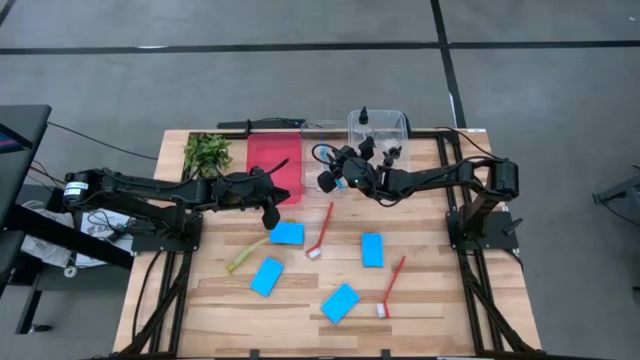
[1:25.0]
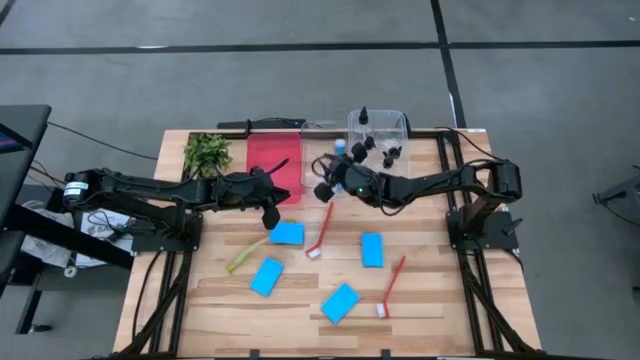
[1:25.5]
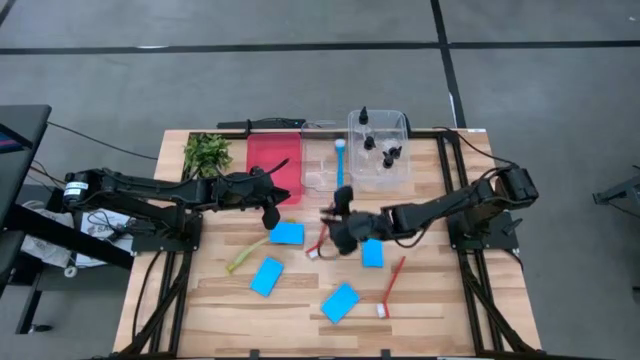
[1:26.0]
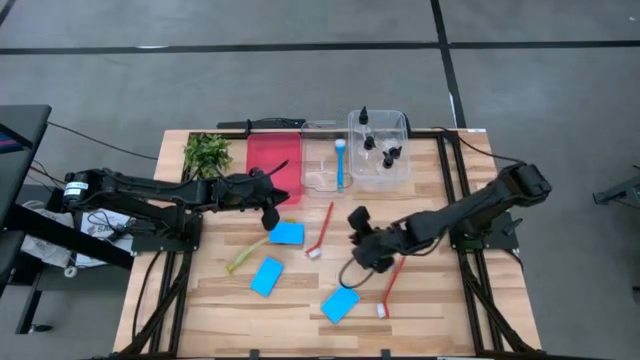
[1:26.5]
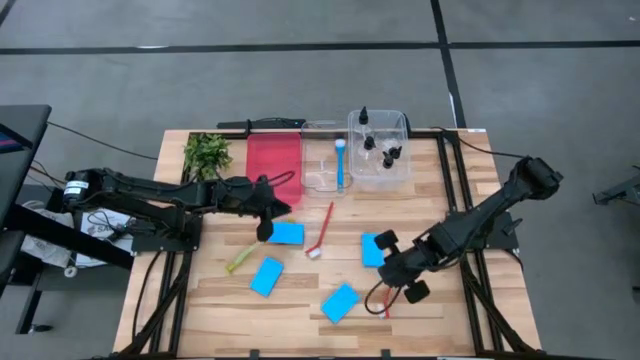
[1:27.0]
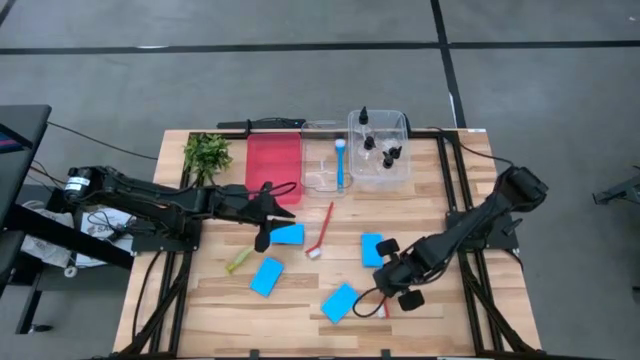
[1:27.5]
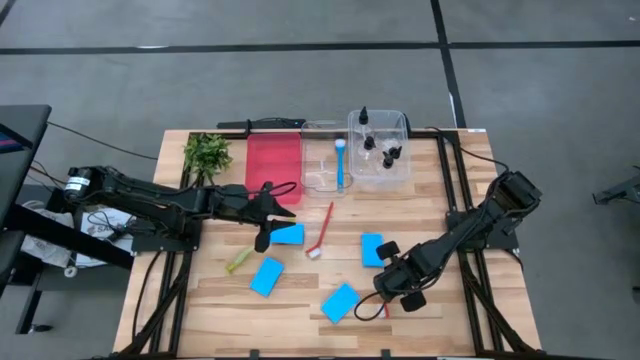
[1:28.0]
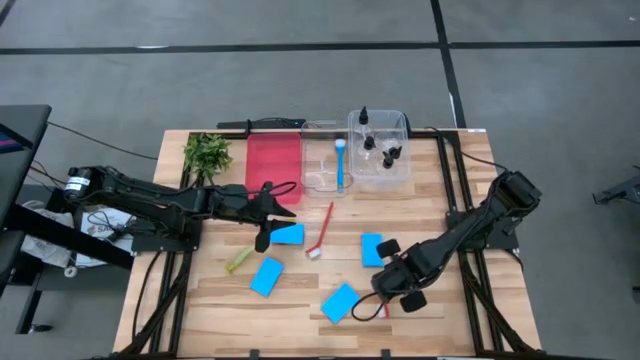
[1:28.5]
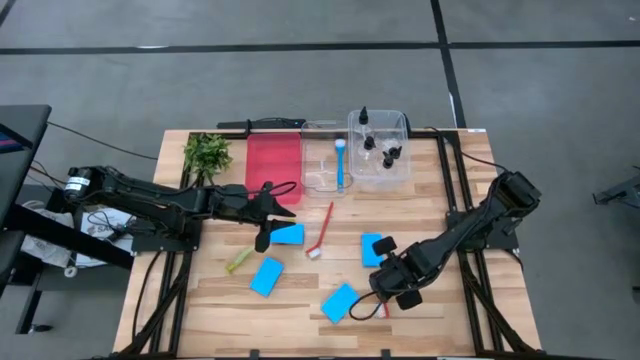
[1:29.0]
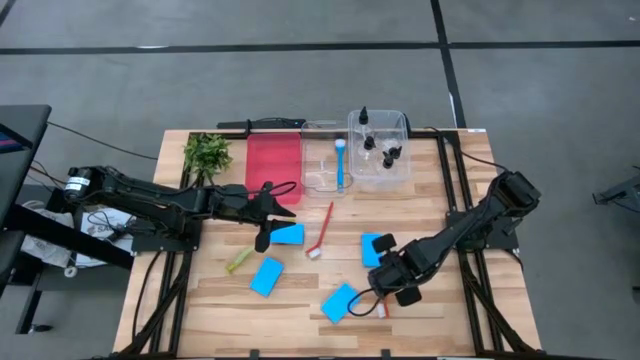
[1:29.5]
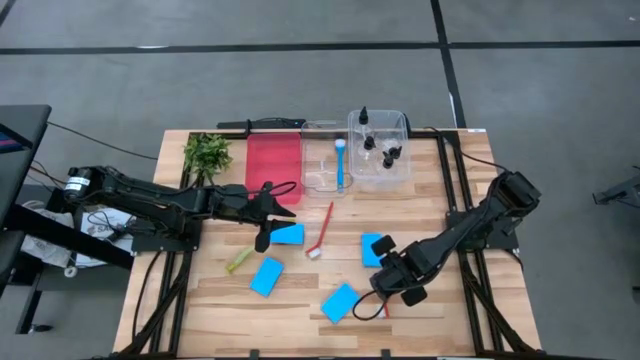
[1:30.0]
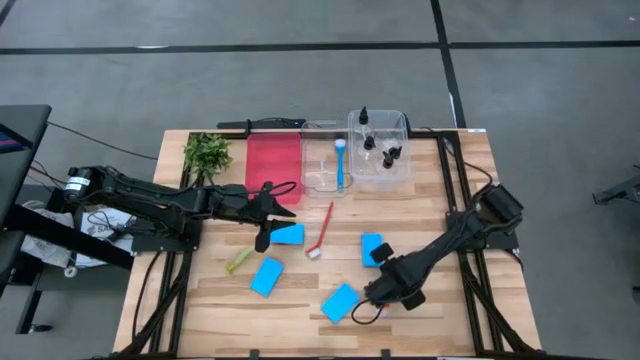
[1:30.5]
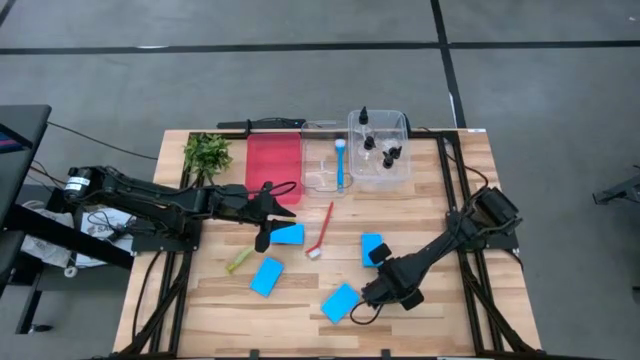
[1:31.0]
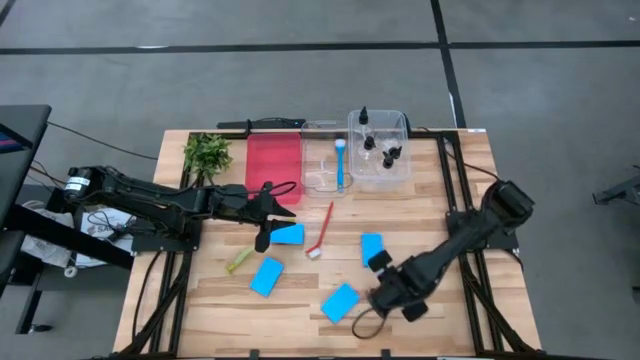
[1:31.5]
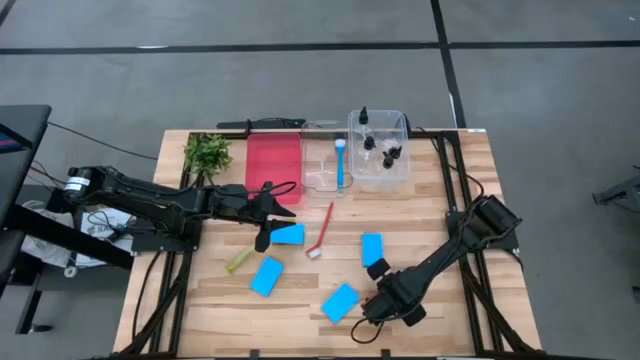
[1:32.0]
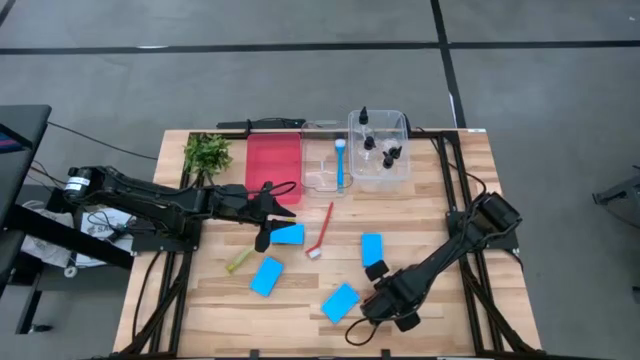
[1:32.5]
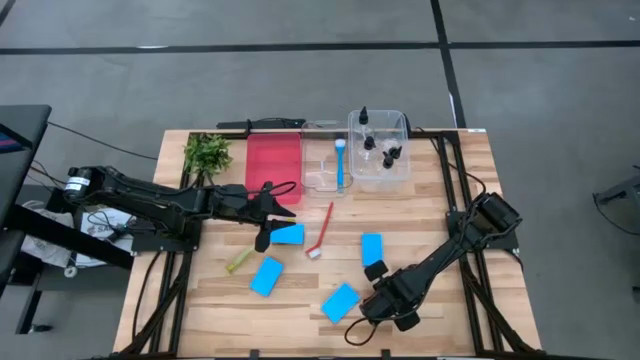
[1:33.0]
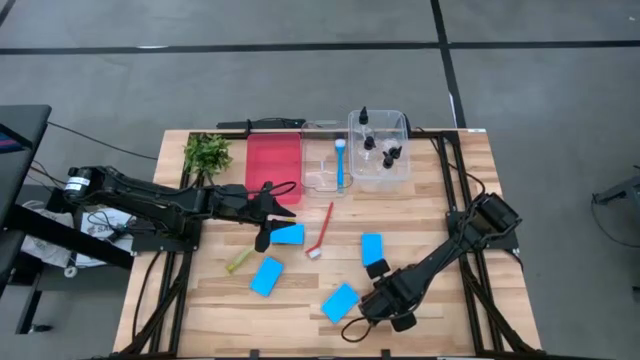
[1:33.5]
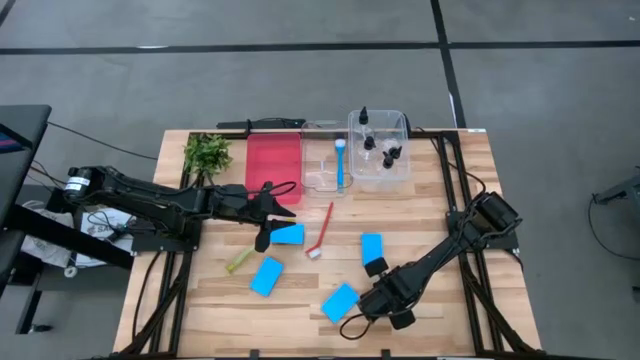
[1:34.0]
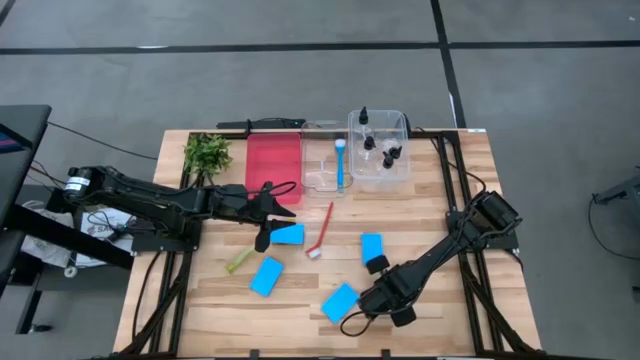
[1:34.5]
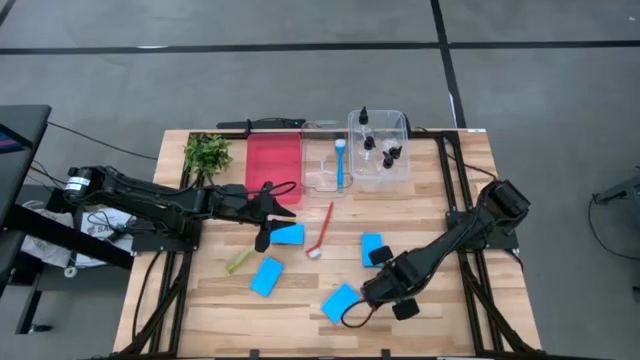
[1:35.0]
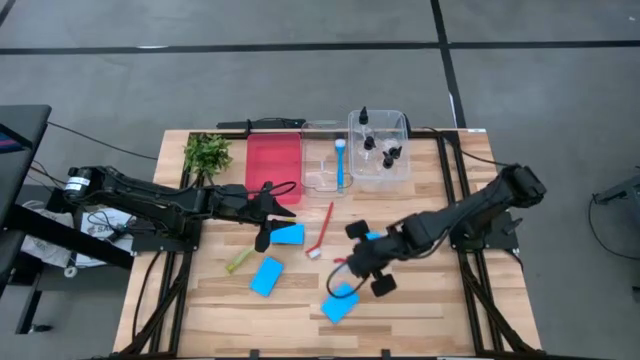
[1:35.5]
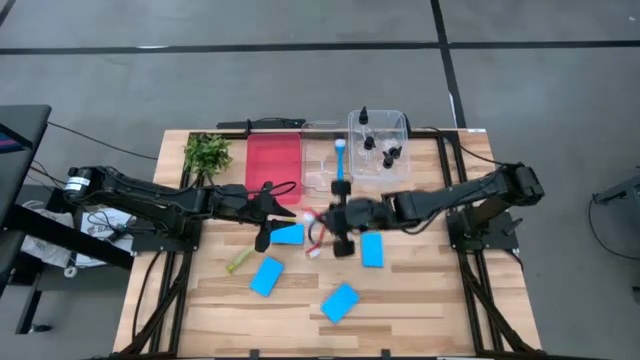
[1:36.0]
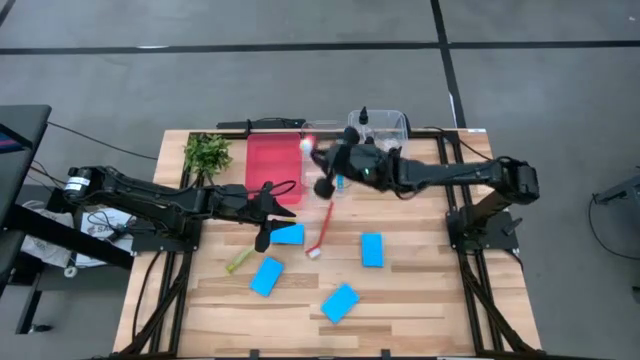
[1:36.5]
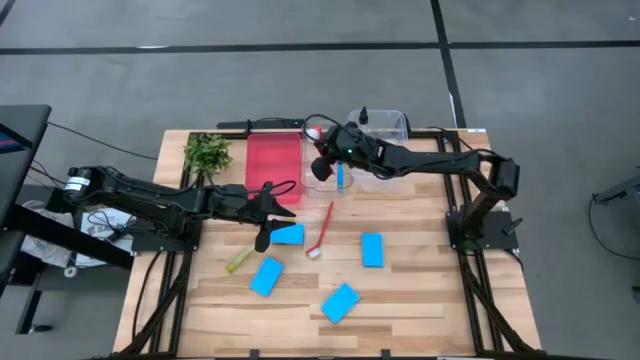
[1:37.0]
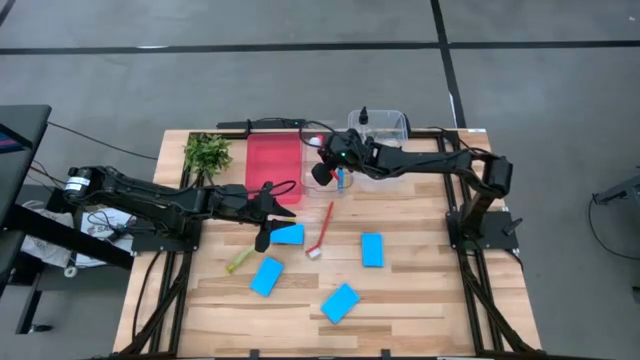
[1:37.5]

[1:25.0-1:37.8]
Task: Pick & Place Kitchen Sink Supplies
Put the bottom orange dish brush into the left transparent bin

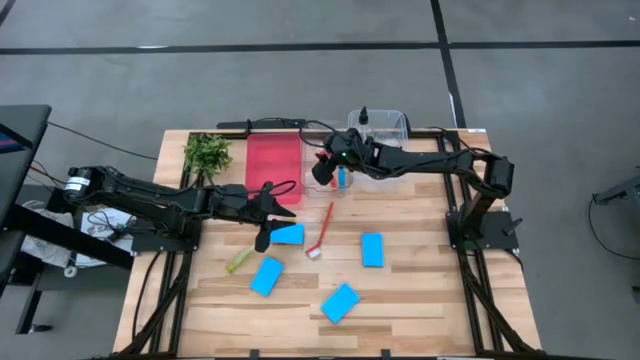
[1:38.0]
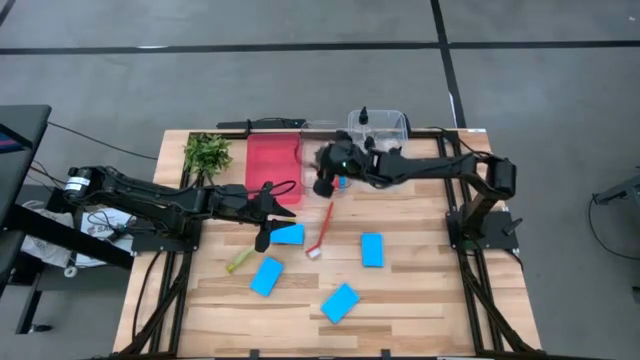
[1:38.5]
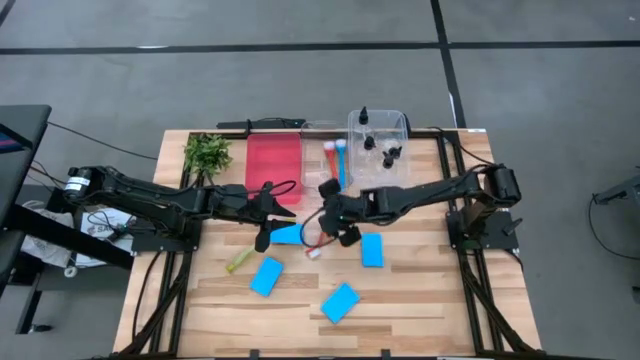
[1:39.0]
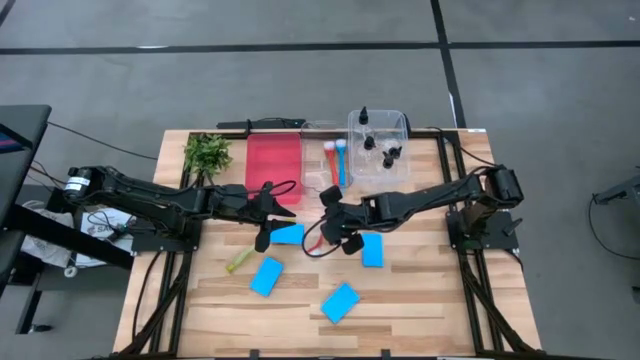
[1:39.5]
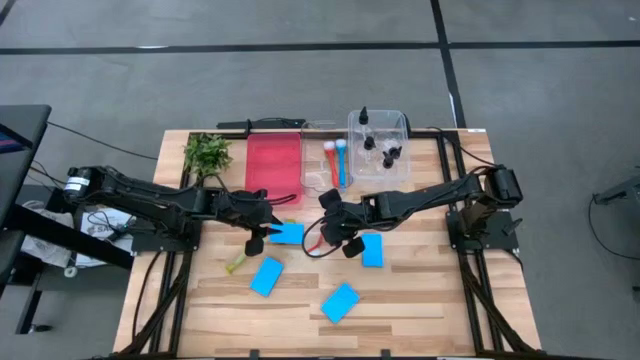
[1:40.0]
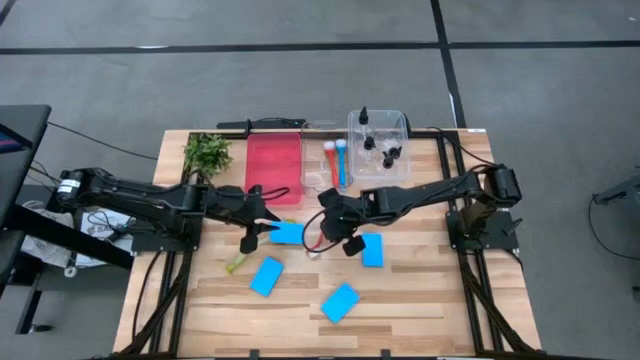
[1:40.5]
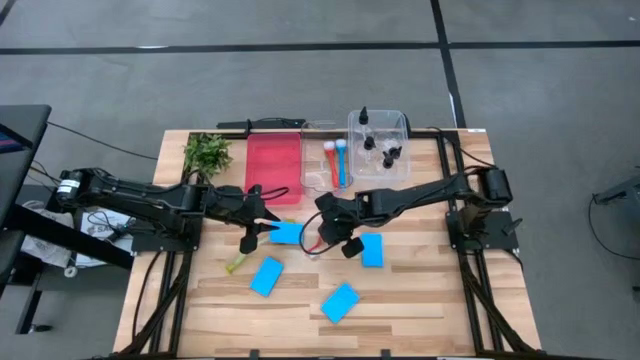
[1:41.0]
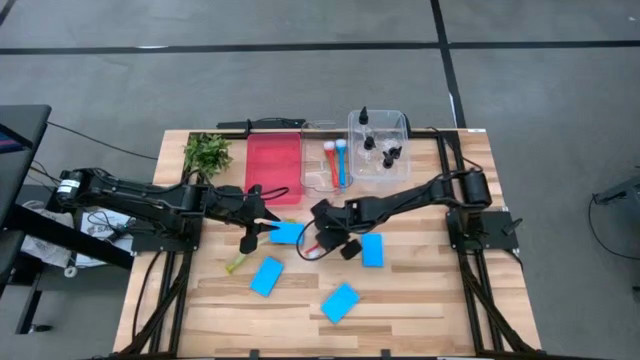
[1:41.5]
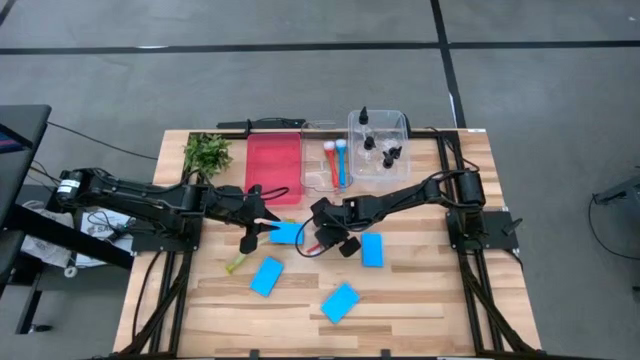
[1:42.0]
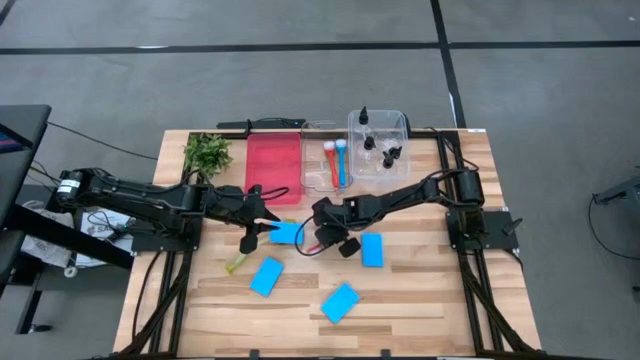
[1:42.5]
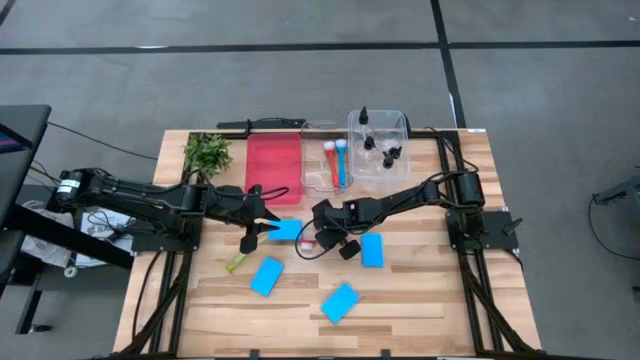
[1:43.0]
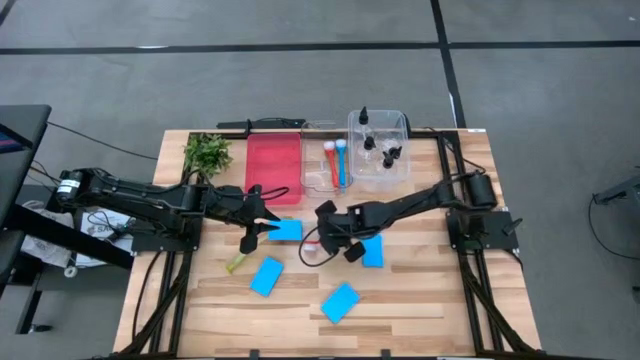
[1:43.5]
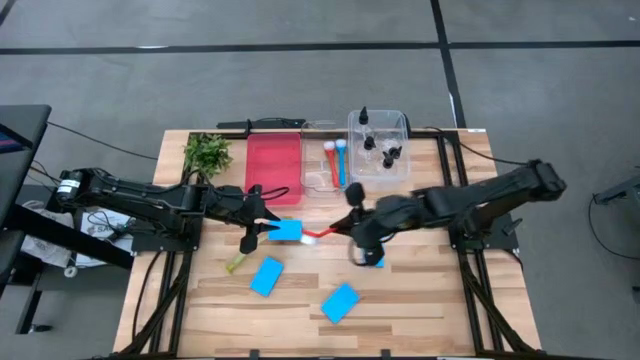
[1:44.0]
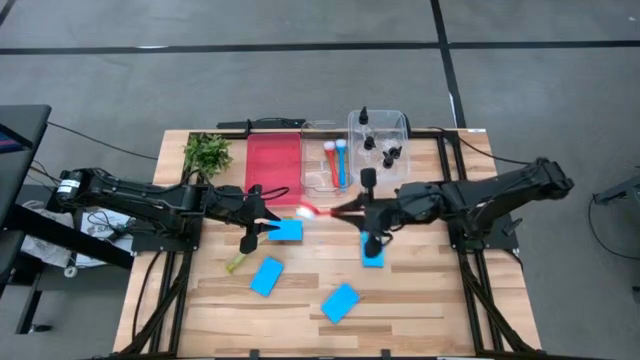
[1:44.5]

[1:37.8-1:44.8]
Put the orange dish brush into the left transparent bin

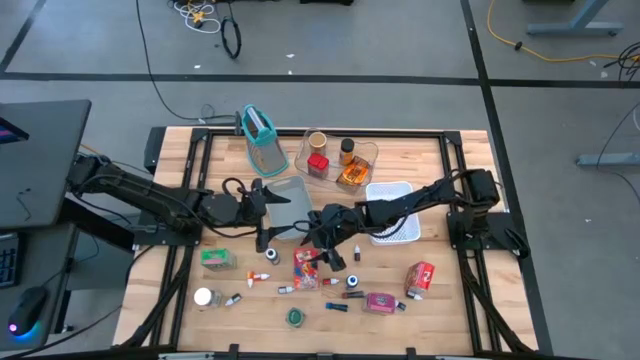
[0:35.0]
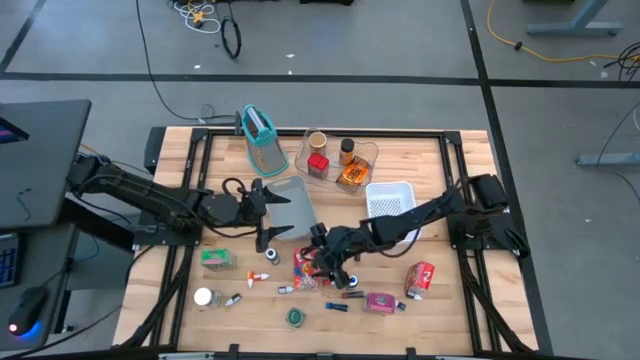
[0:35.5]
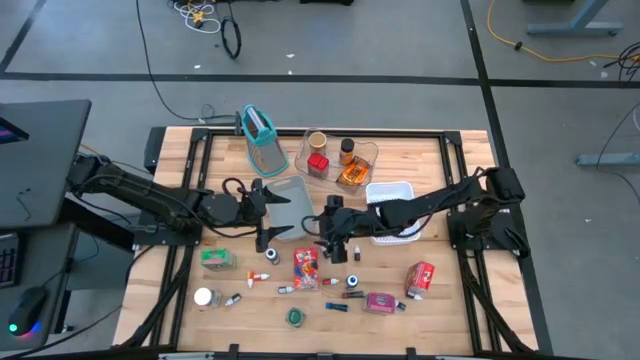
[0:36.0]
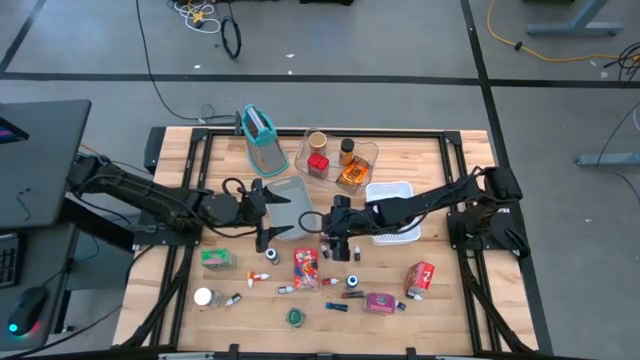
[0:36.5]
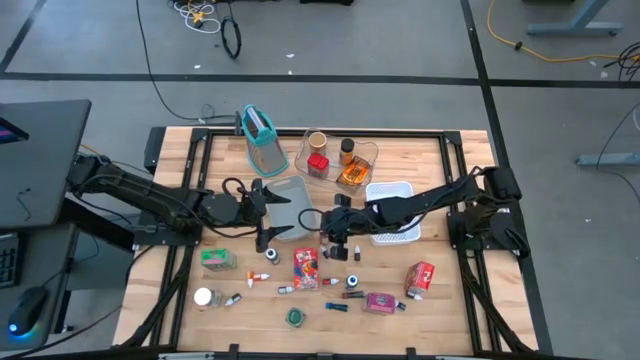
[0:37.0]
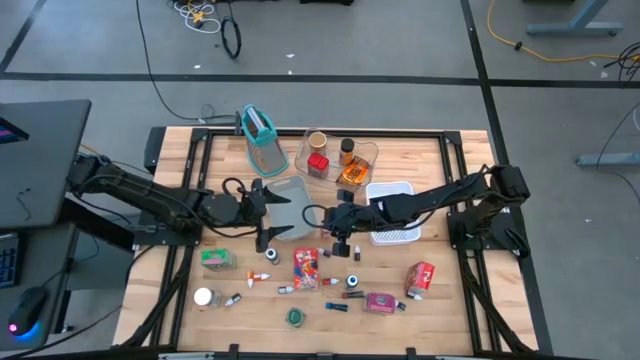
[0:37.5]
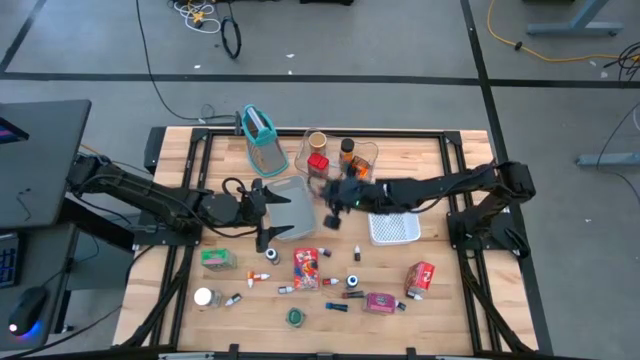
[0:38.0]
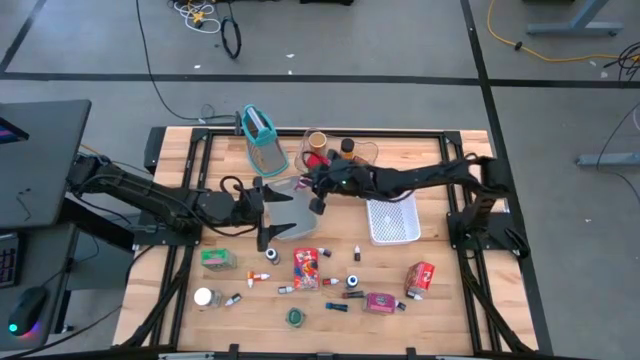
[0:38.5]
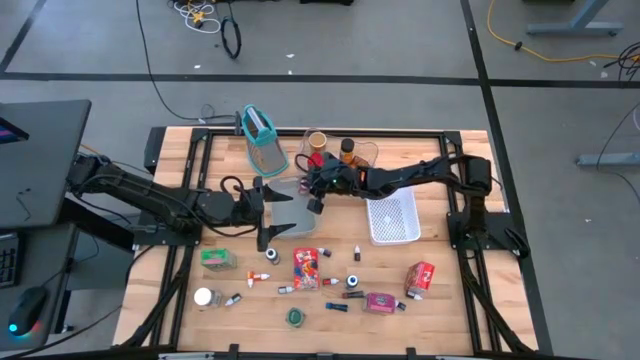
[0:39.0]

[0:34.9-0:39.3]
Task: Pick & Place Kitchen Items
Put the large orange food coloring bottle into the gray bin
